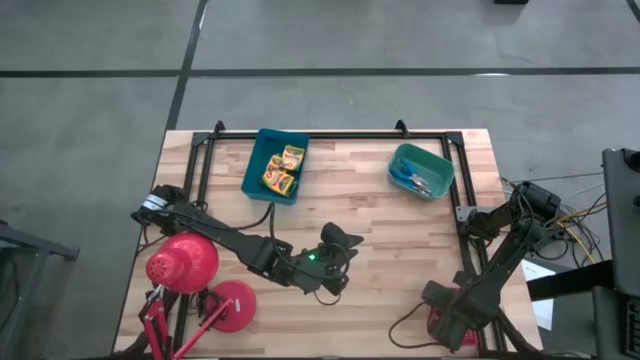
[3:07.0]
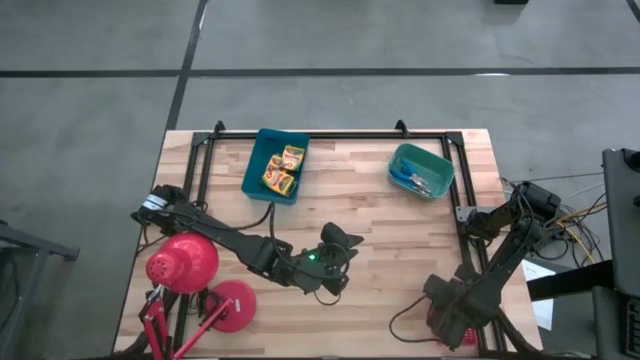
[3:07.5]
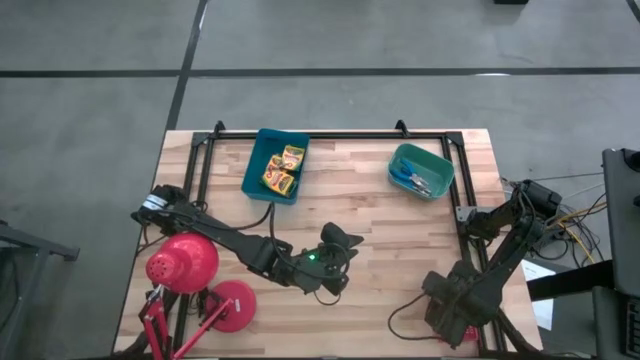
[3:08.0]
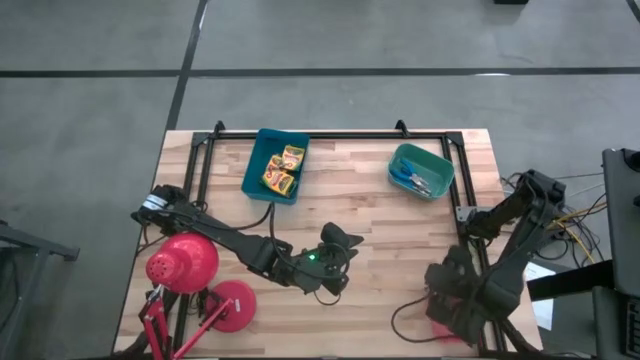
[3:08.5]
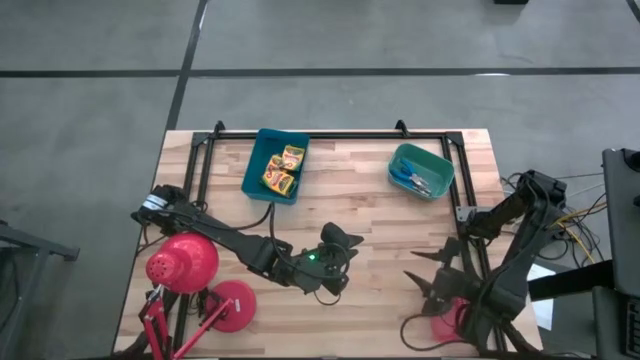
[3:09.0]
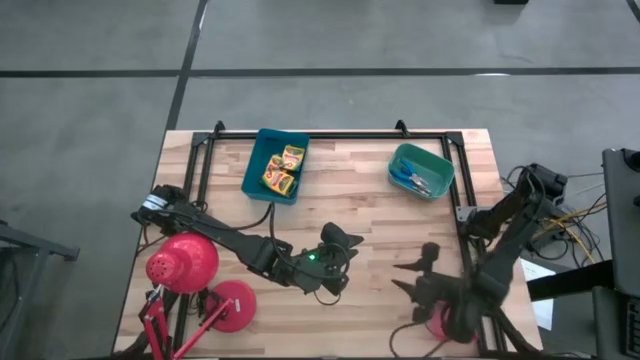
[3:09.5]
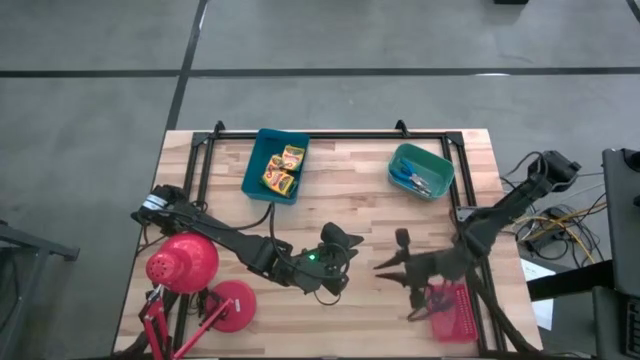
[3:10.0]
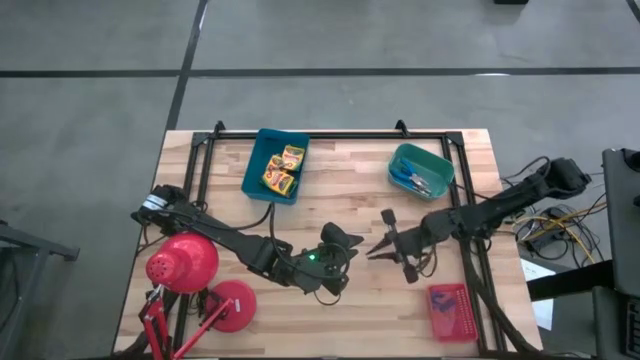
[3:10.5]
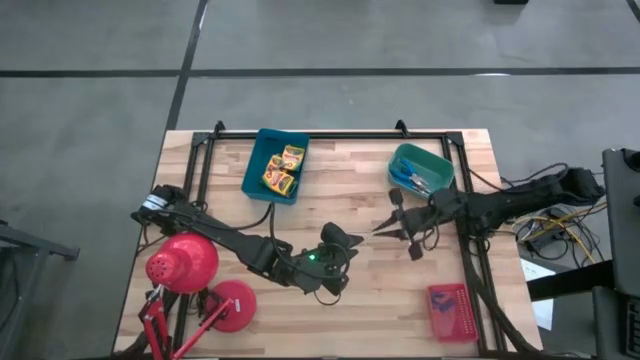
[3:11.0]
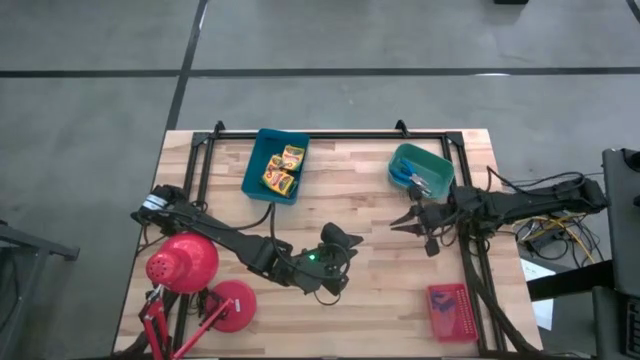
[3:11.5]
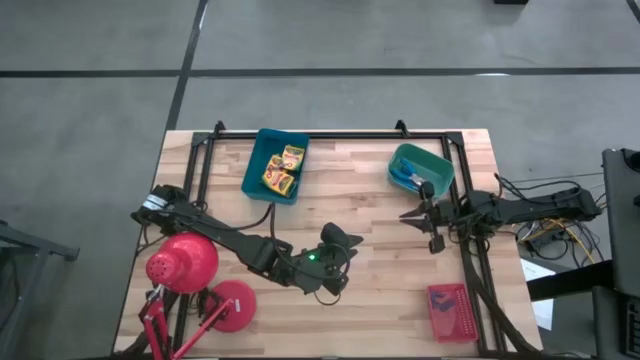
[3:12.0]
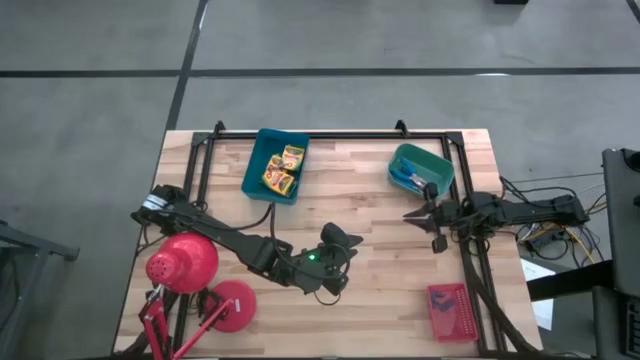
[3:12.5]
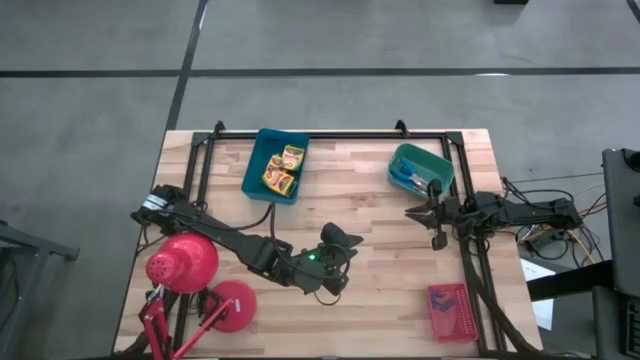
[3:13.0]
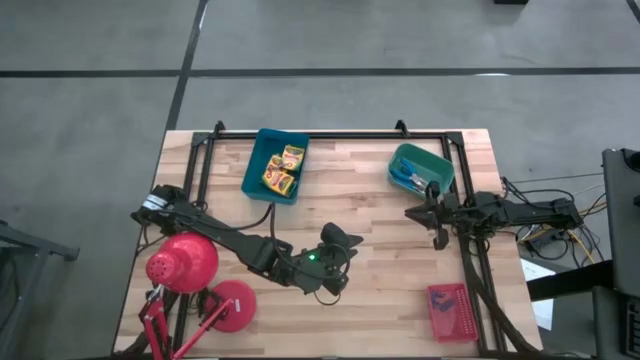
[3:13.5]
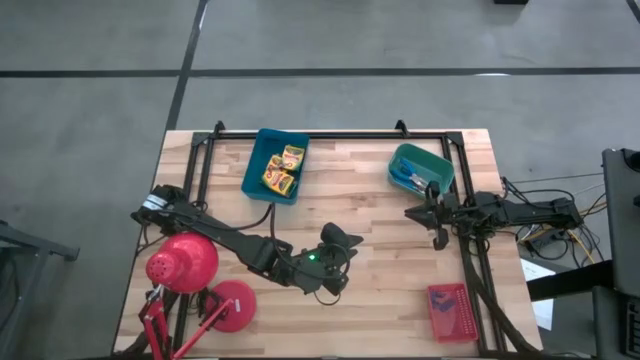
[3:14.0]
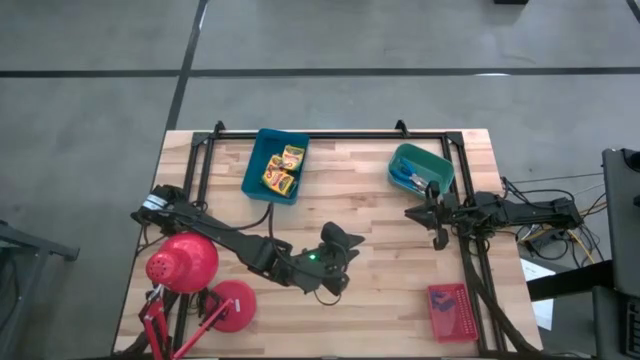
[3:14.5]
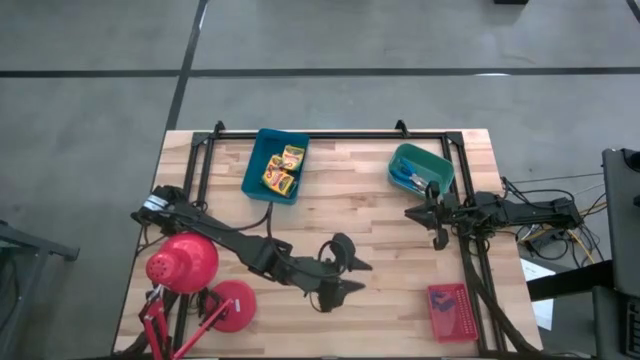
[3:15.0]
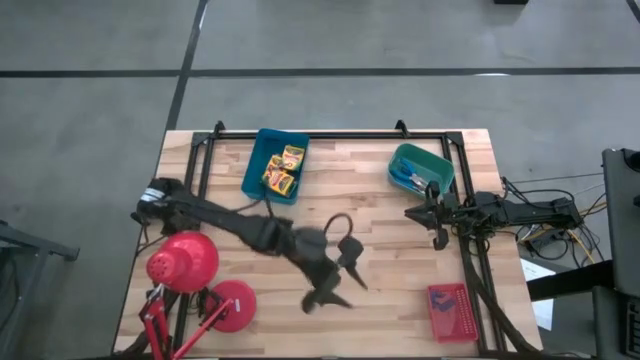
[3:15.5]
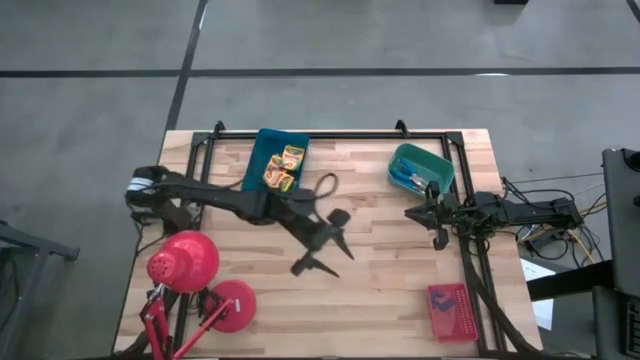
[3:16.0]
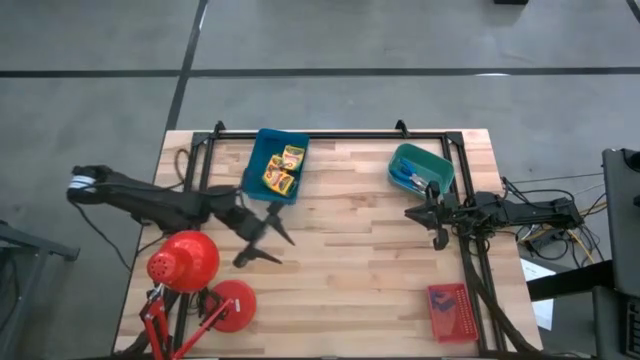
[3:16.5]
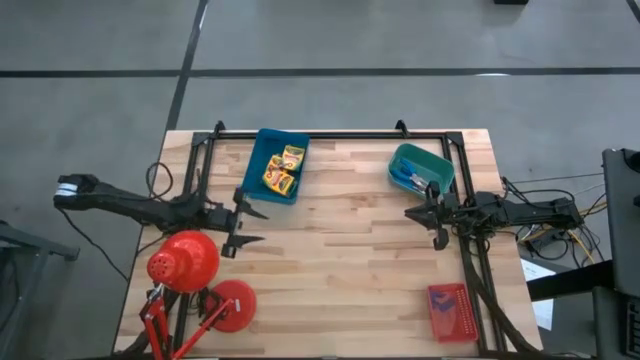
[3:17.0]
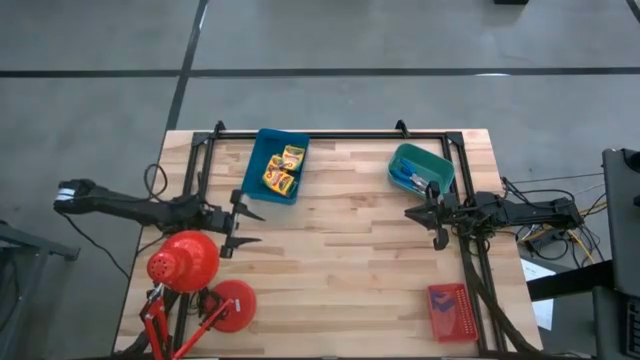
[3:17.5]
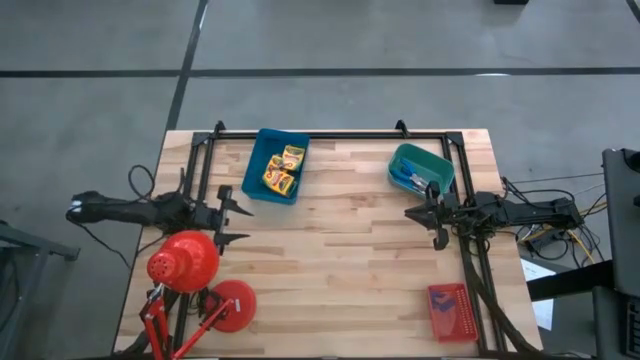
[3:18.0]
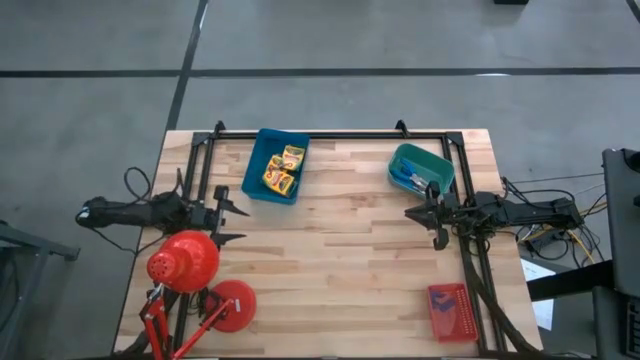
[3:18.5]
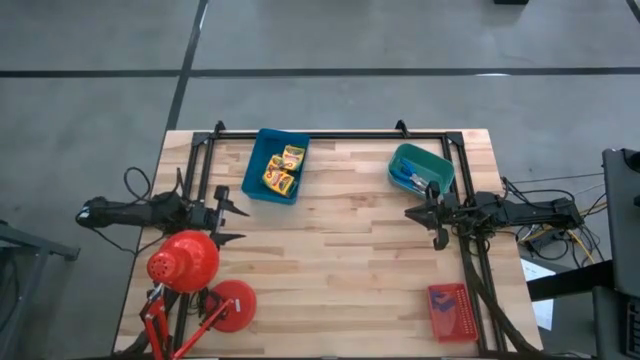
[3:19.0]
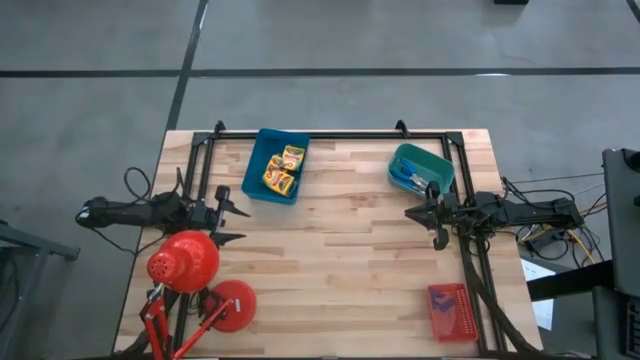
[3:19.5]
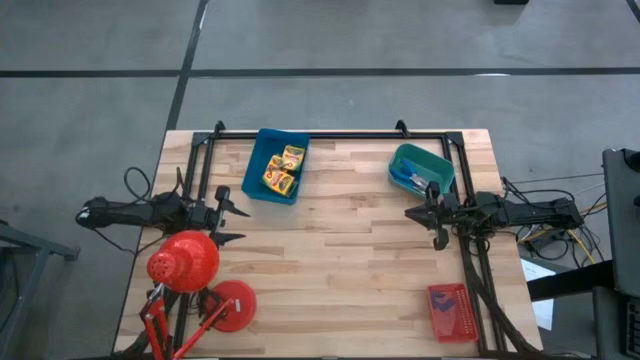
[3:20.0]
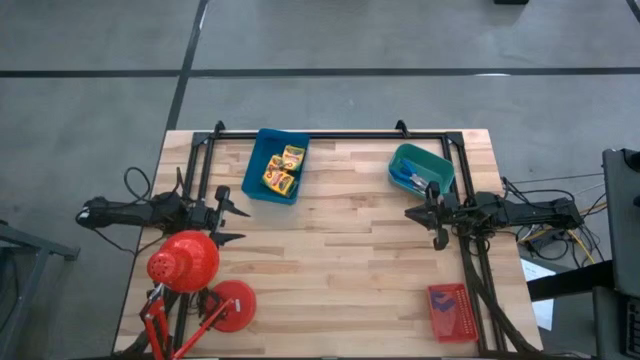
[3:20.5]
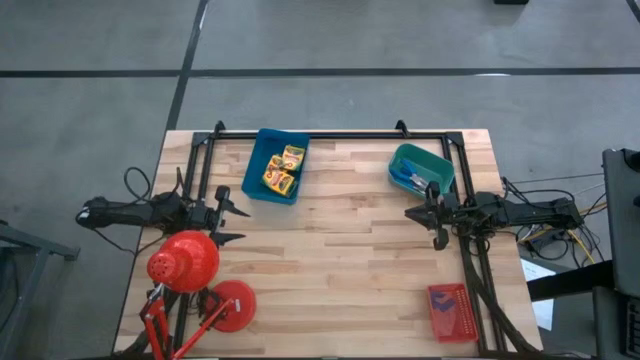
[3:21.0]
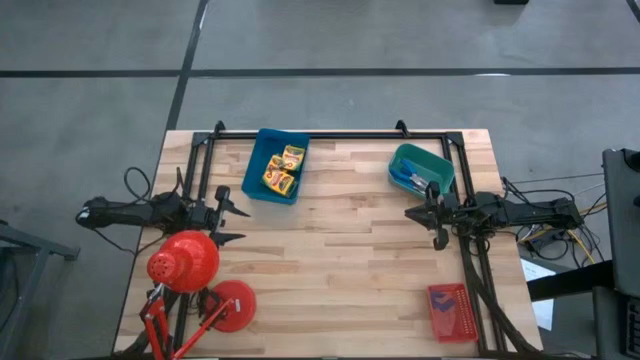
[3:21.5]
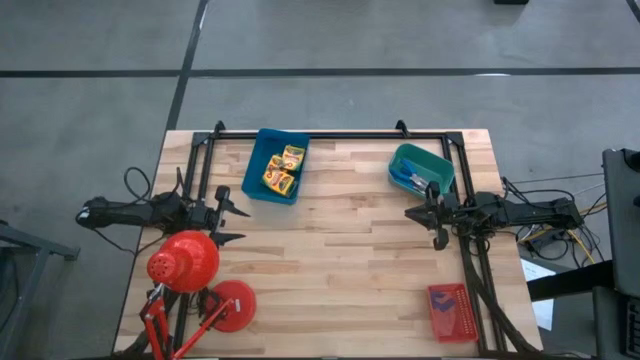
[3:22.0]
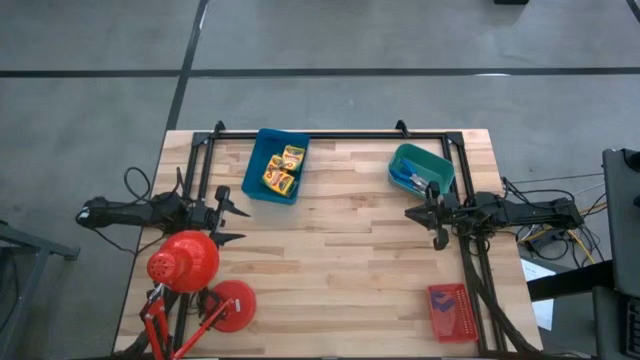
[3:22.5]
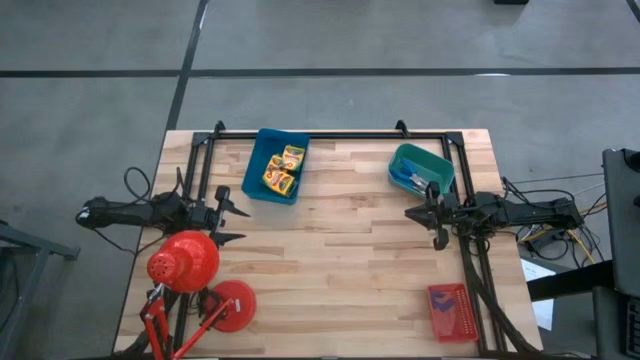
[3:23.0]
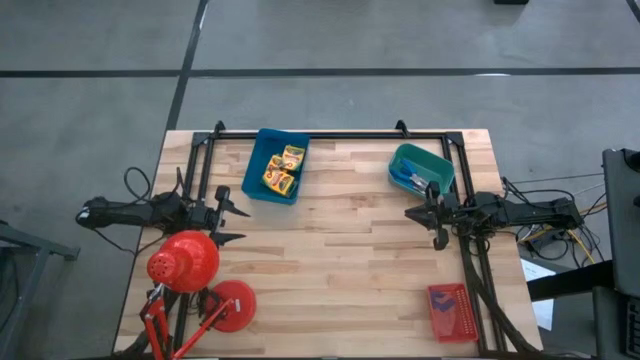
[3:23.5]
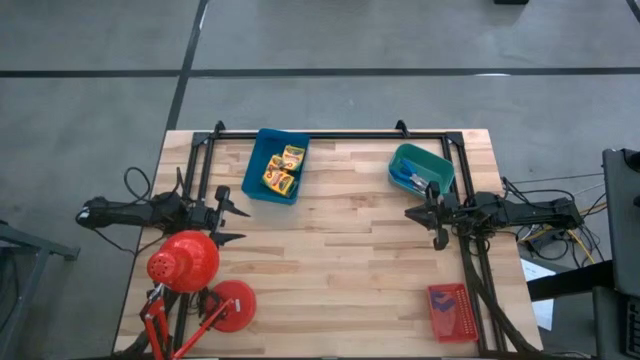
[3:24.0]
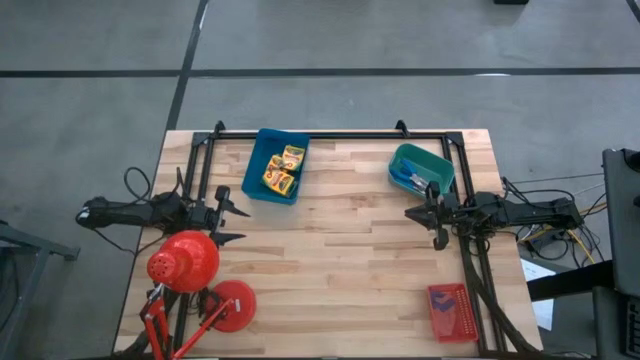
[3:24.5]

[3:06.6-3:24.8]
Task: Pick & Place School Supplies
Return to Home Position

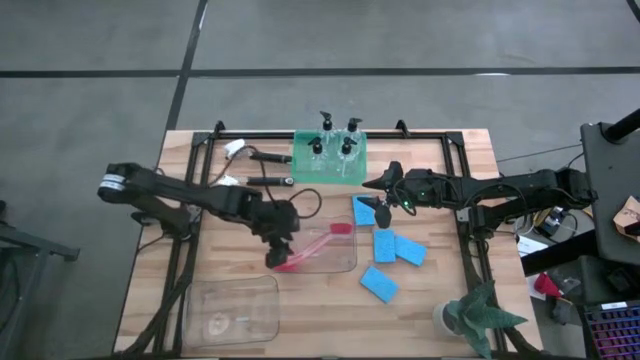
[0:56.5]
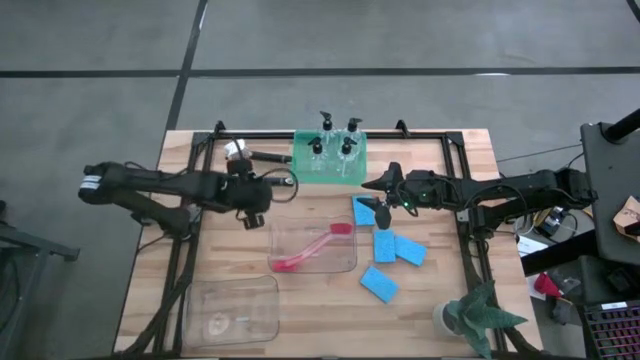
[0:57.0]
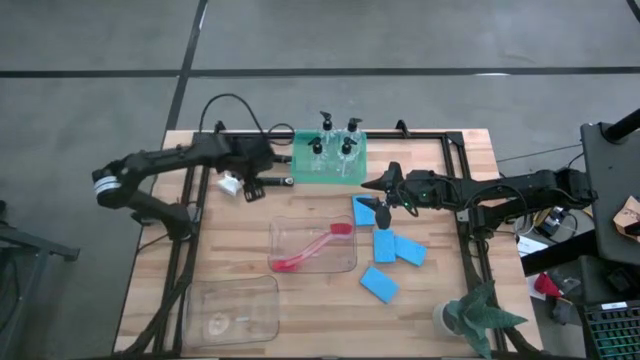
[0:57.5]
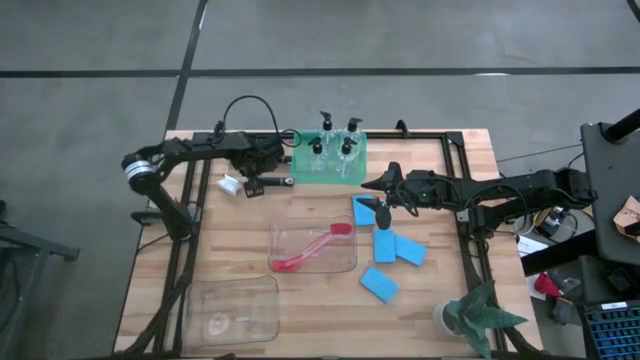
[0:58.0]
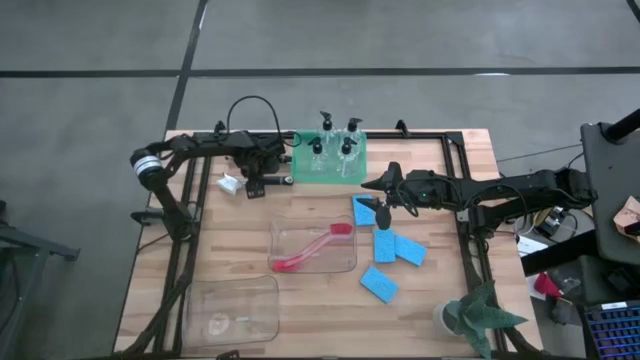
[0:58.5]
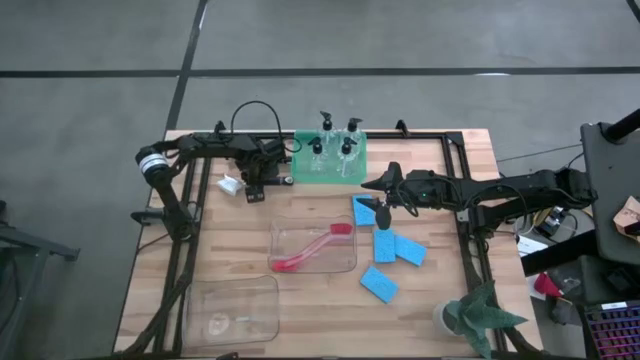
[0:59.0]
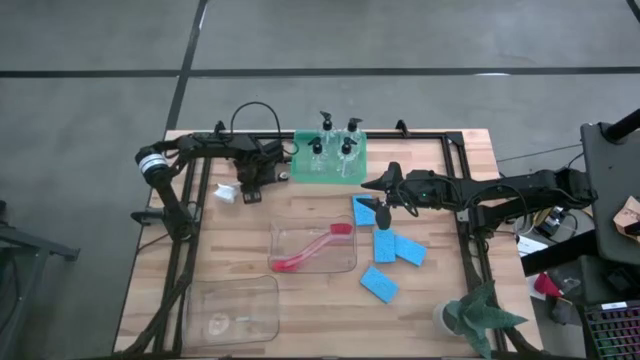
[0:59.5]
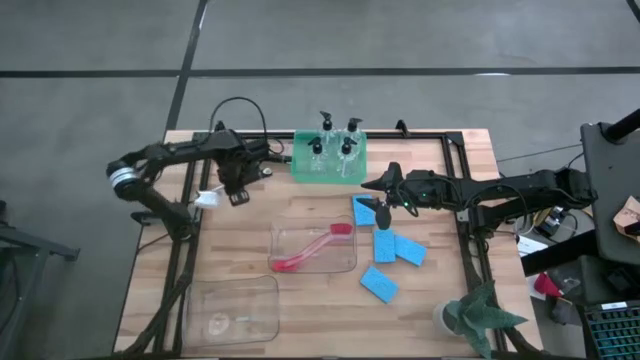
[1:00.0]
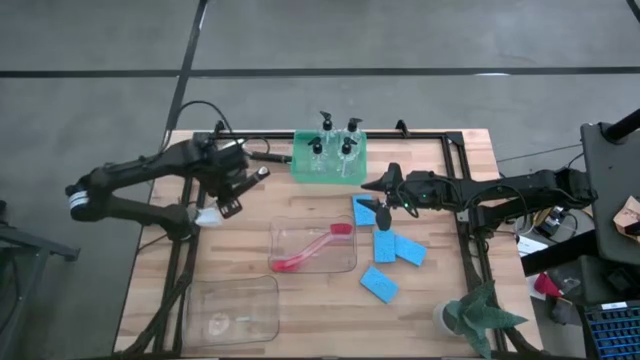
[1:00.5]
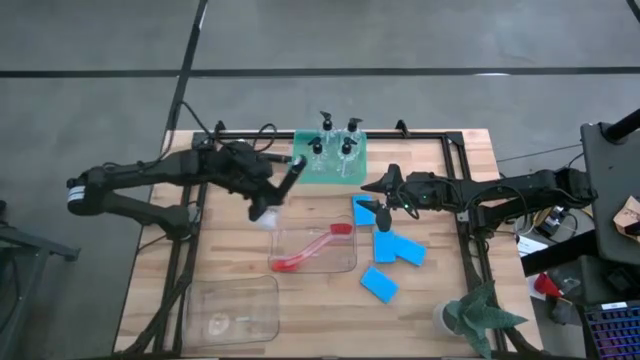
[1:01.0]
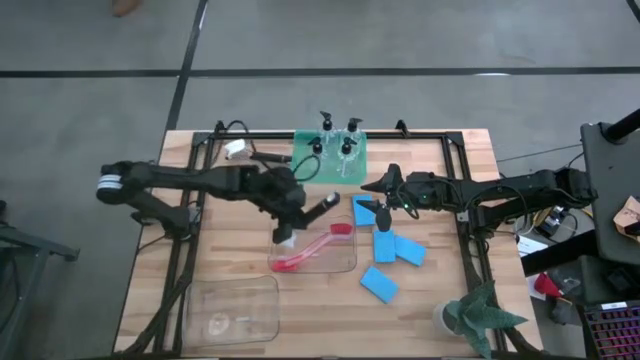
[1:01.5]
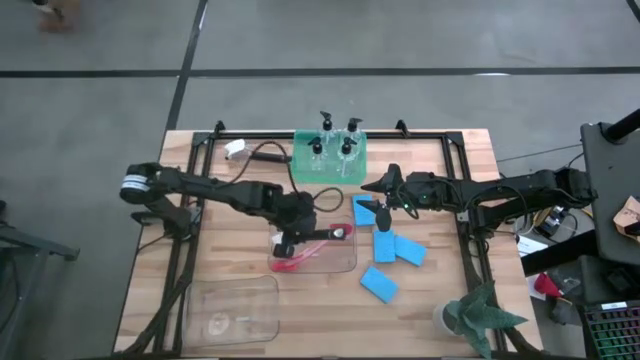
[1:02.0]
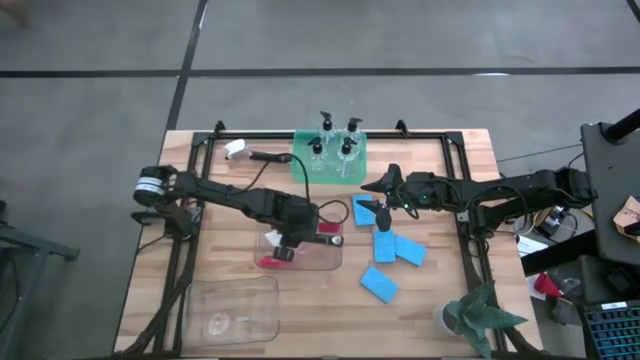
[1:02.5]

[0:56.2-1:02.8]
Task: Pick & Place Kitchen Sink Supplies
Put the black dish brush into the top transparent bin
